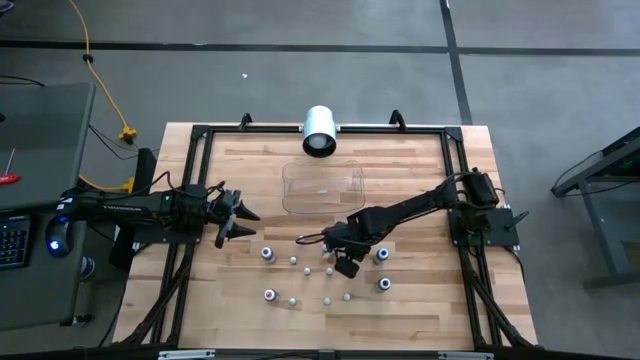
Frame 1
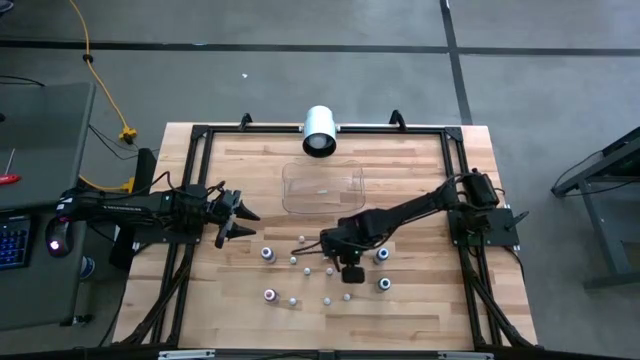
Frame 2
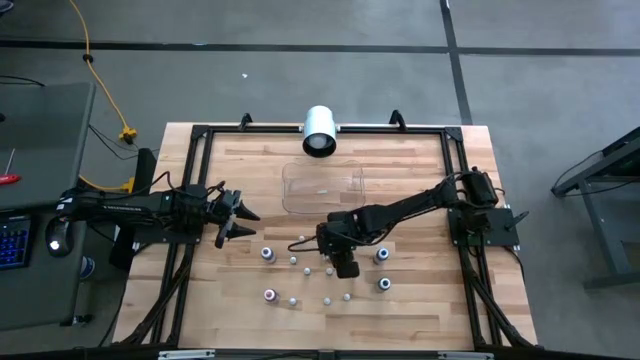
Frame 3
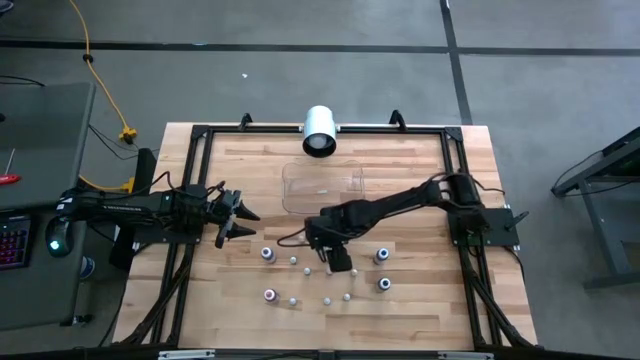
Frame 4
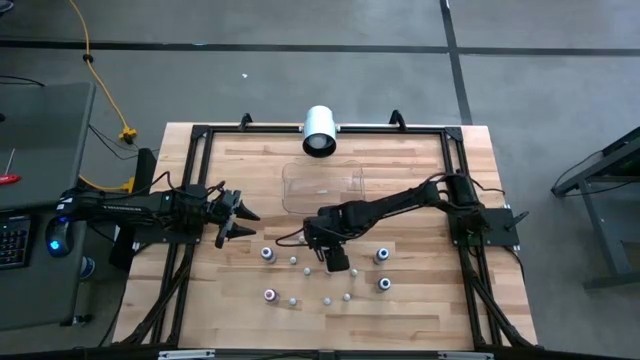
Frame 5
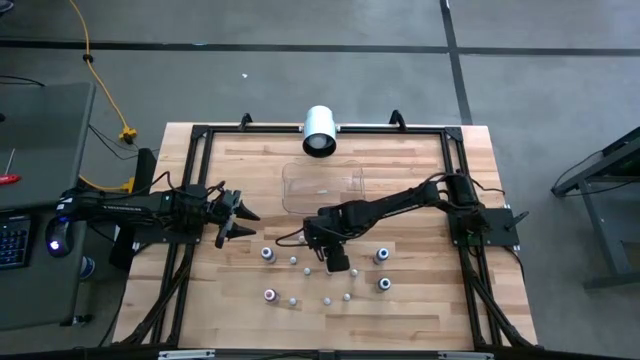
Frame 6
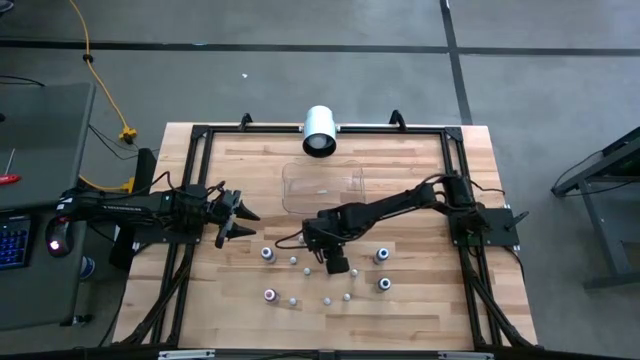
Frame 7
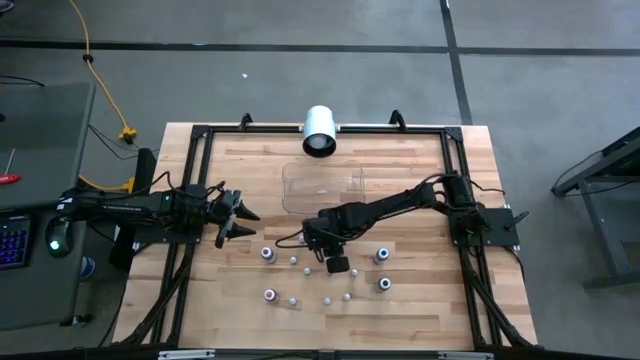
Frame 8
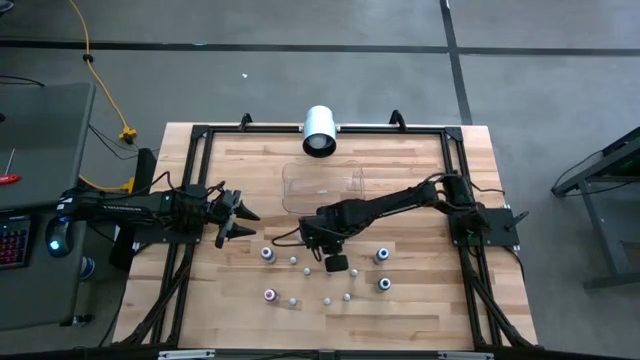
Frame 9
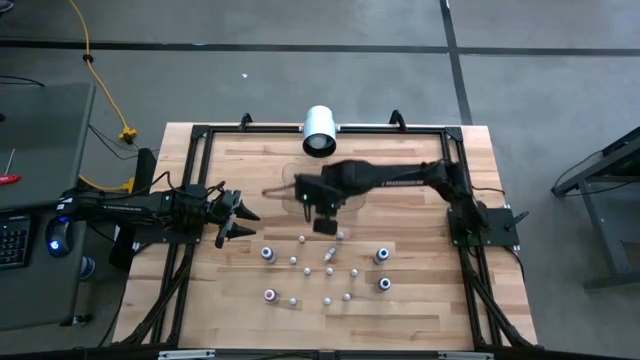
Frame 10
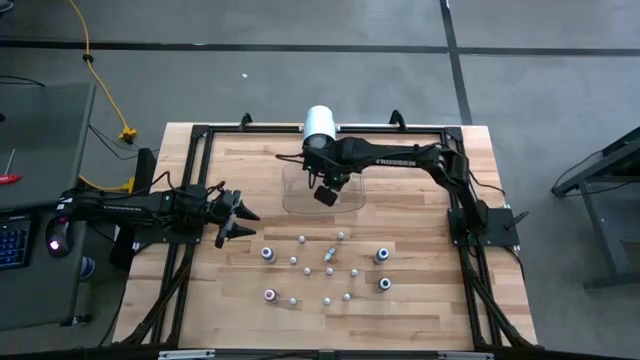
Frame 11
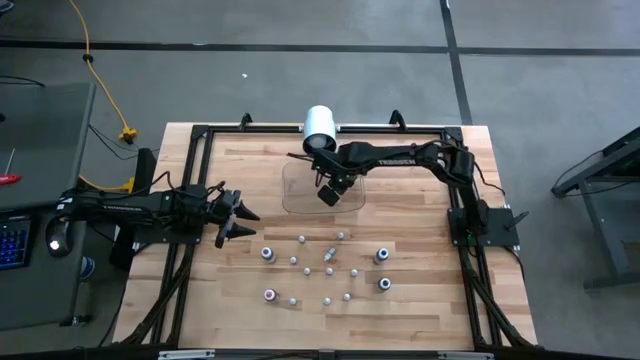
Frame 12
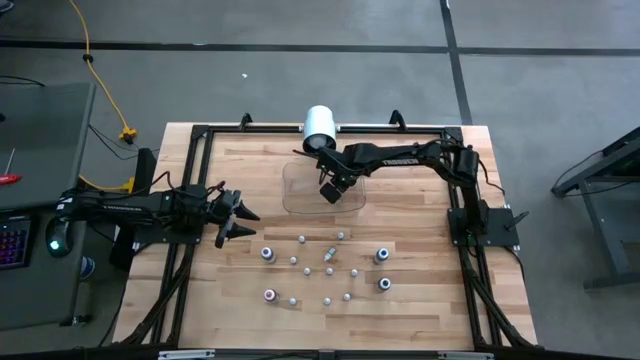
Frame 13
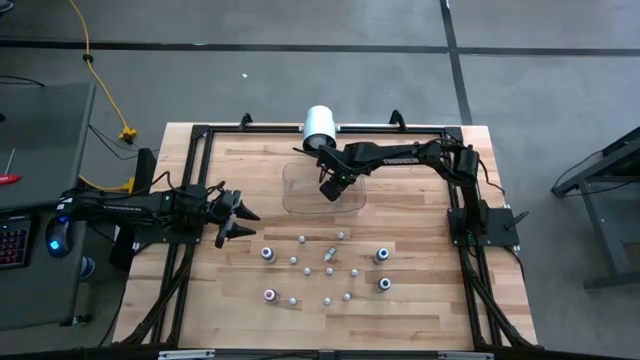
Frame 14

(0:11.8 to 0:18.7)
Task: Pick & Place food coloring
Put the small red food coloring bottle into the transparent bin

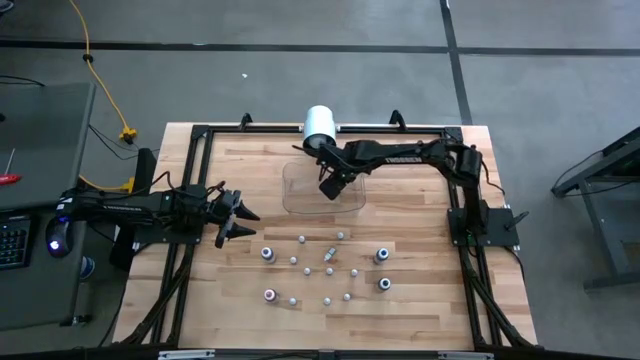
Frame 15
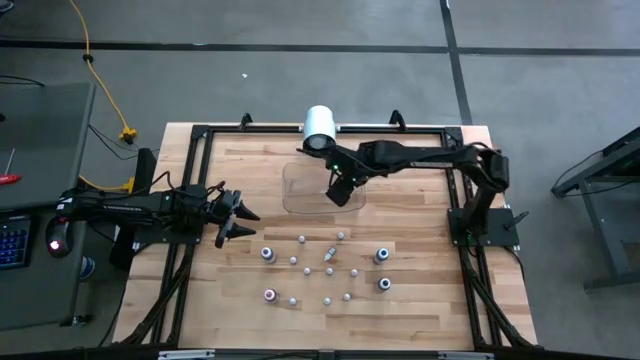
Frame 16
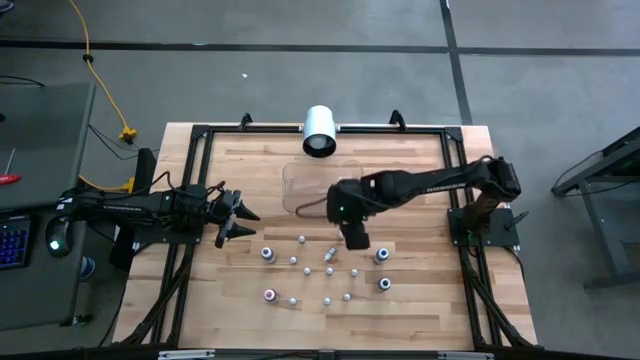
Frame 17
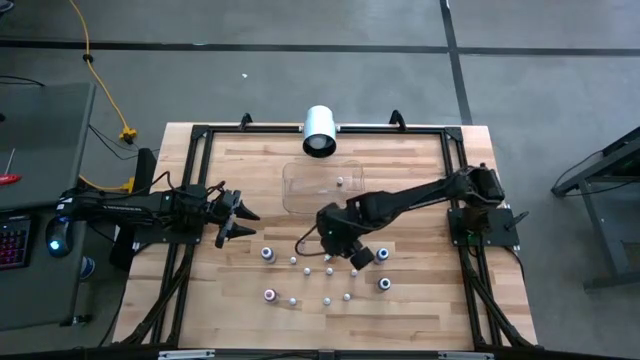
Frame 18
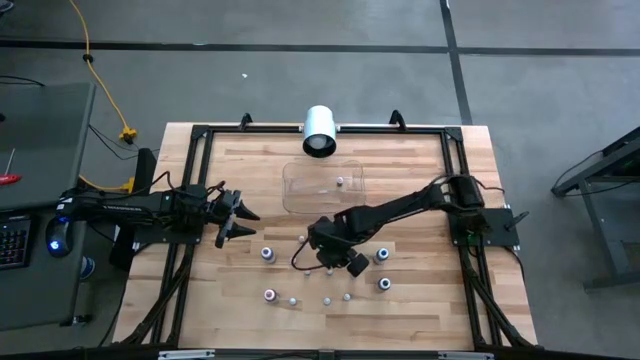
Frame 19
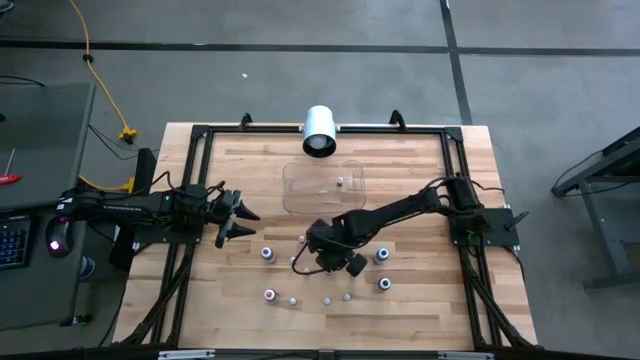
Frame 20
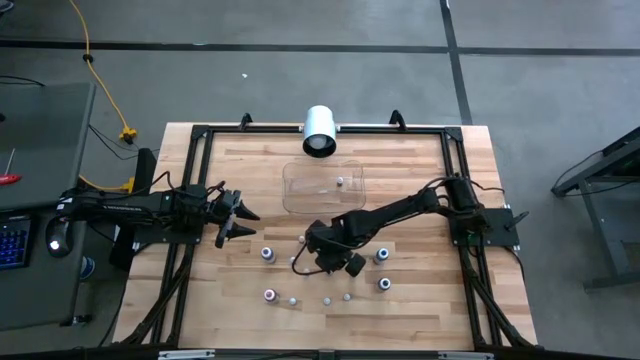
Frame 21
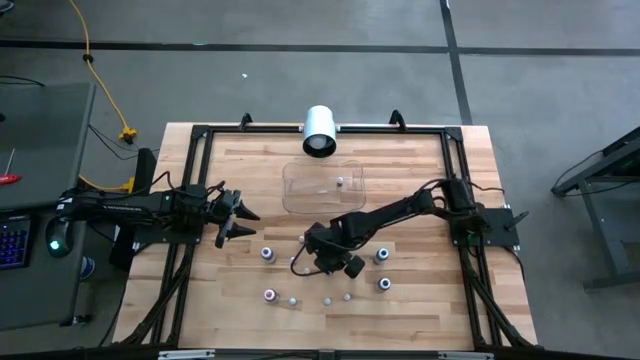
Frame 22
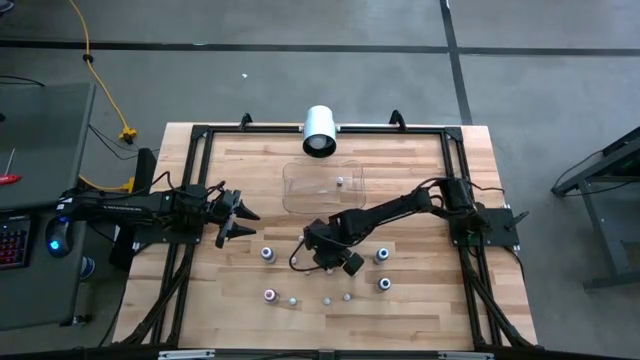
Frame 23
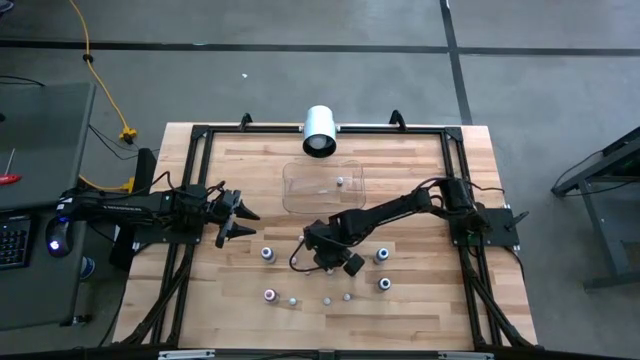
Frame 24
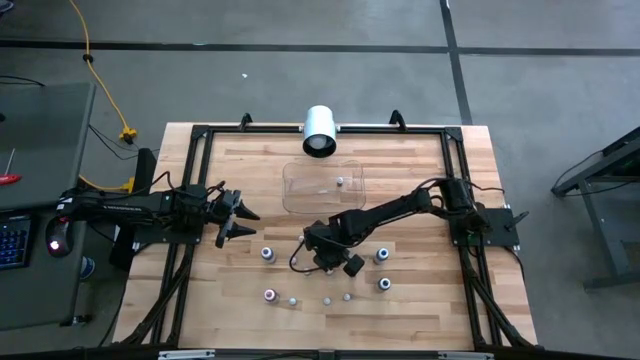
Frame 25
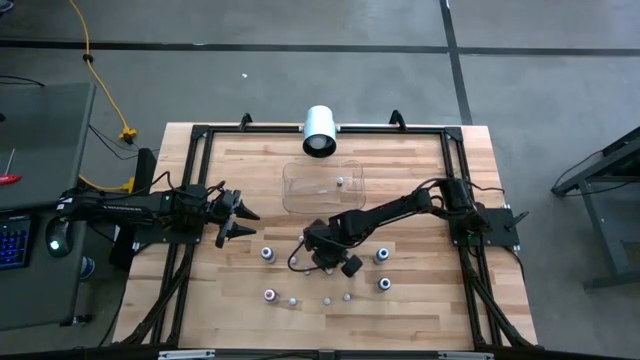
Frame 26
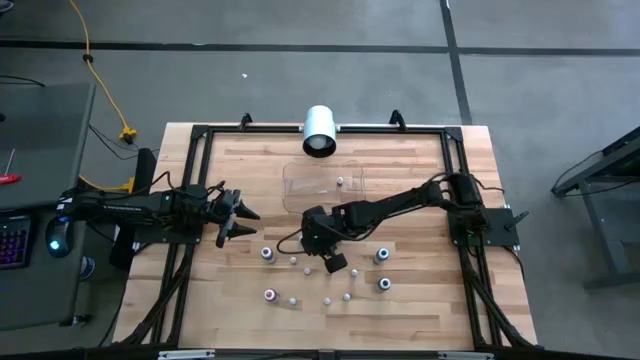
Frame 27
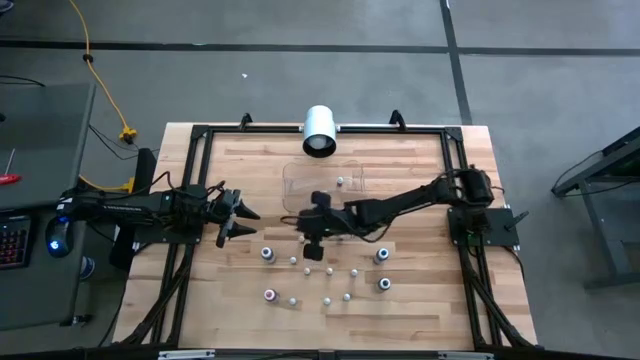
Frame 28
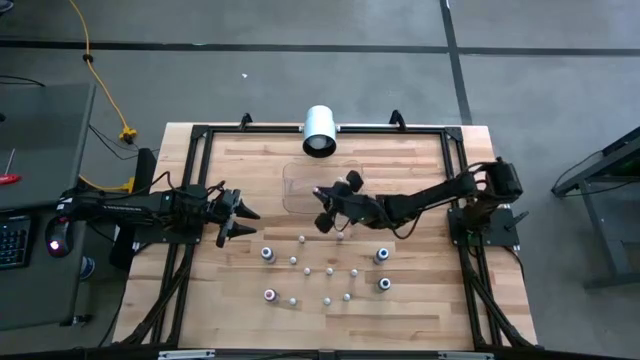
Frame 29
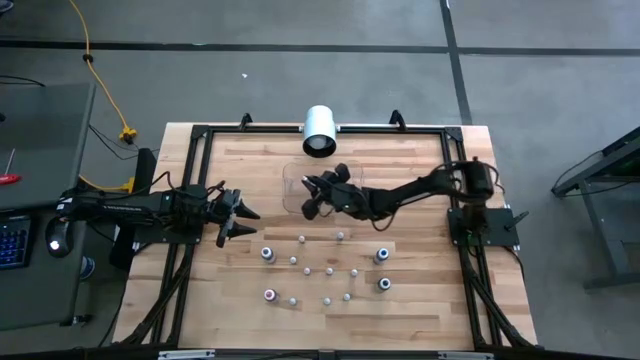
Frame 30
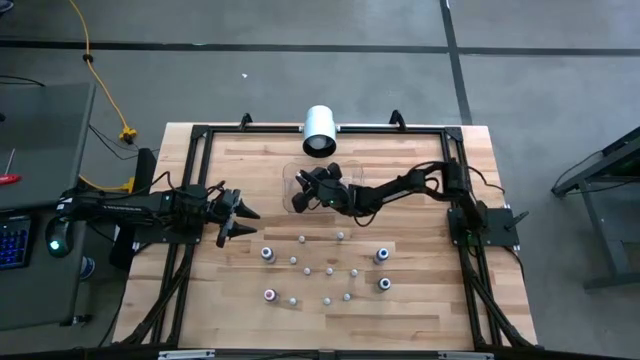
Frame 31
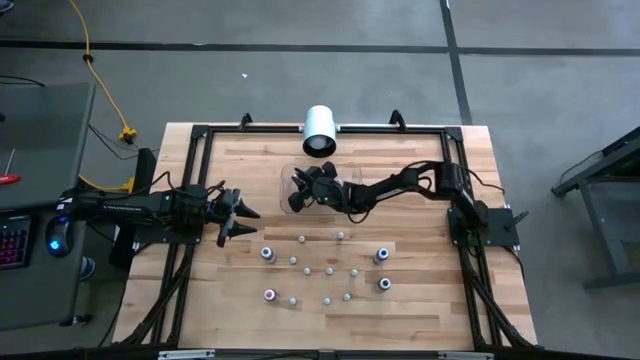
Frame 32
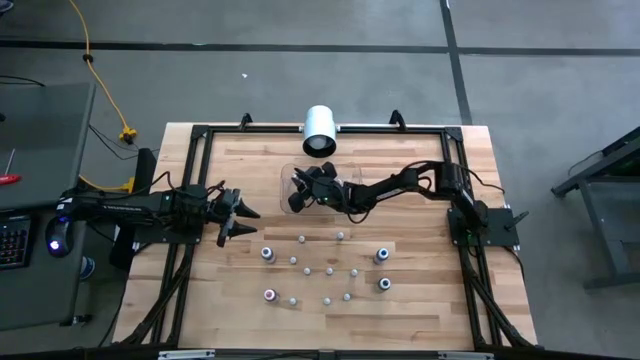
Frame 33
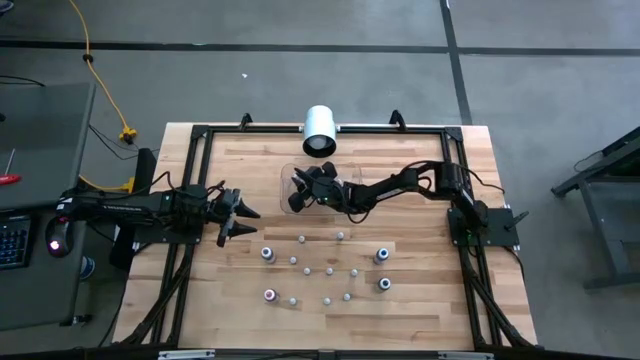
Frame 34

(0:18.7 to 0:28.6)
Put the small green food coloring bottle into the transparent bin

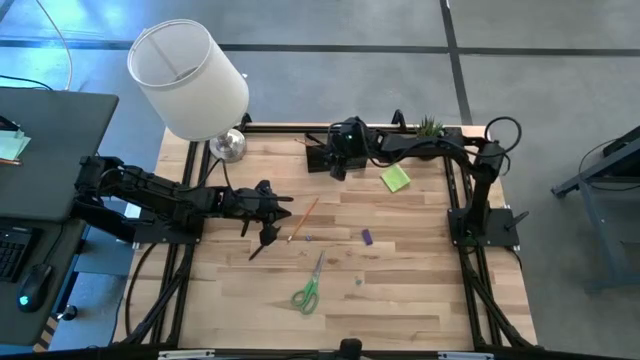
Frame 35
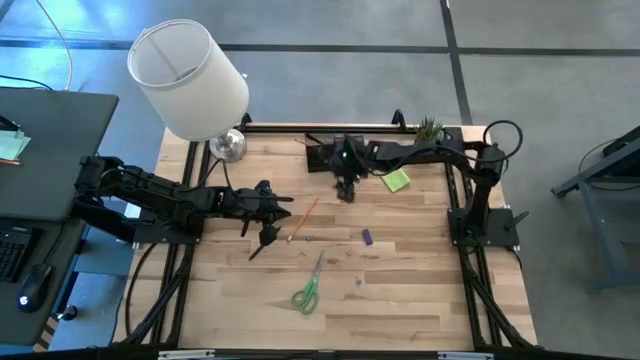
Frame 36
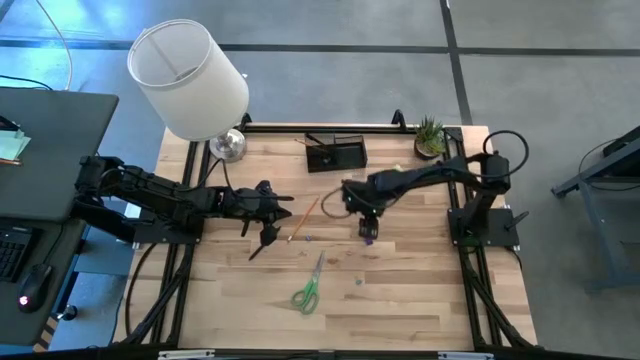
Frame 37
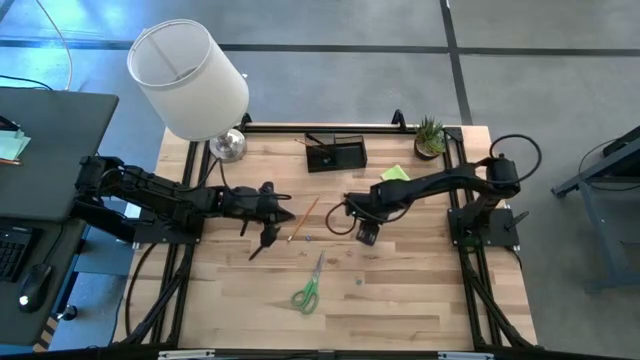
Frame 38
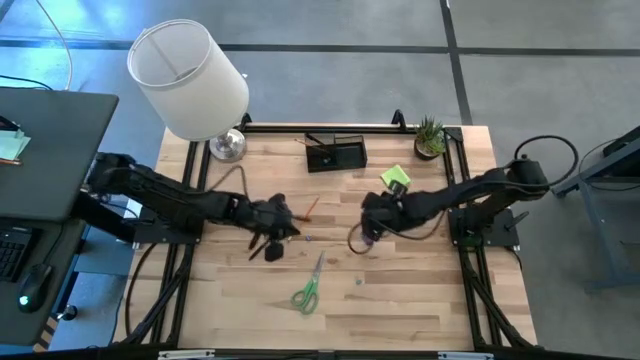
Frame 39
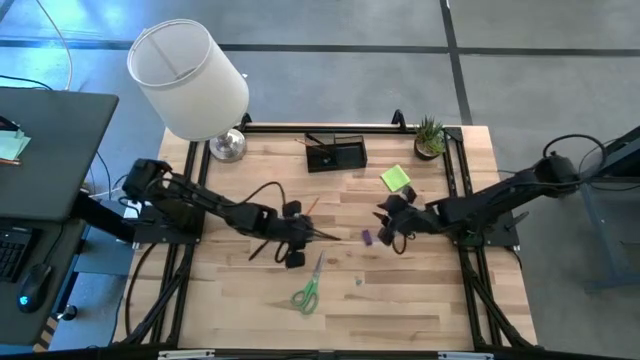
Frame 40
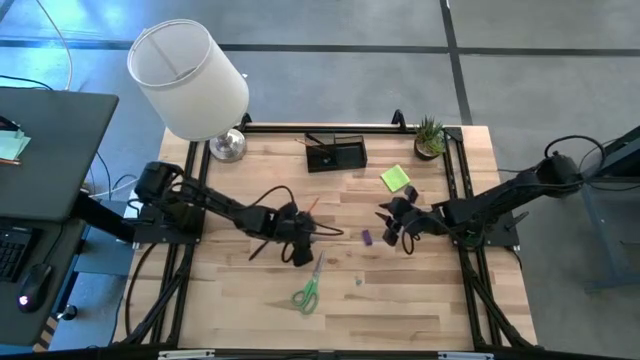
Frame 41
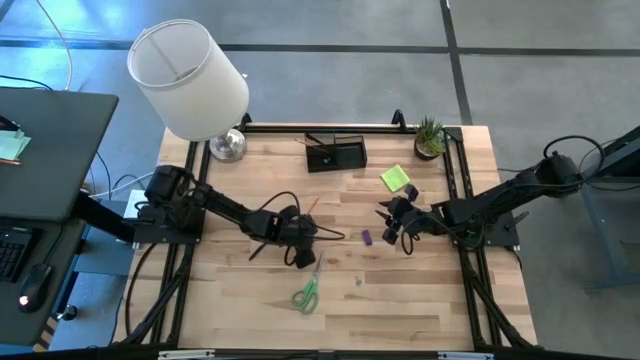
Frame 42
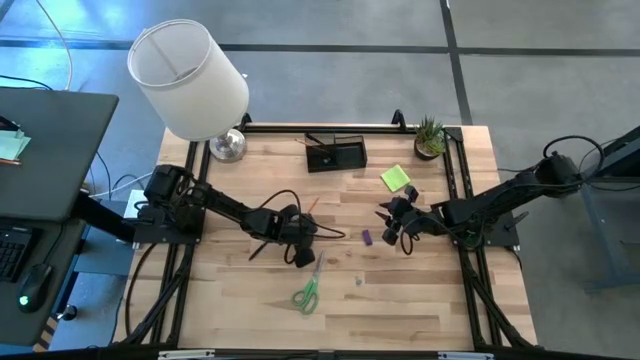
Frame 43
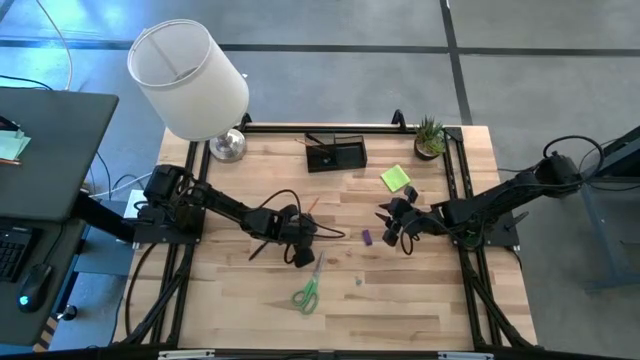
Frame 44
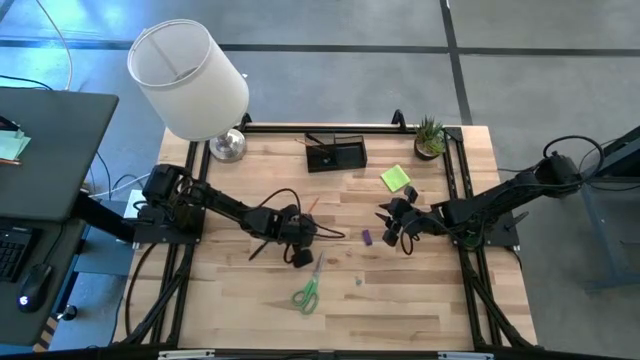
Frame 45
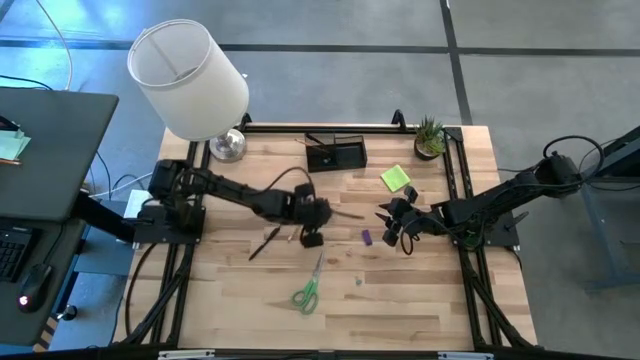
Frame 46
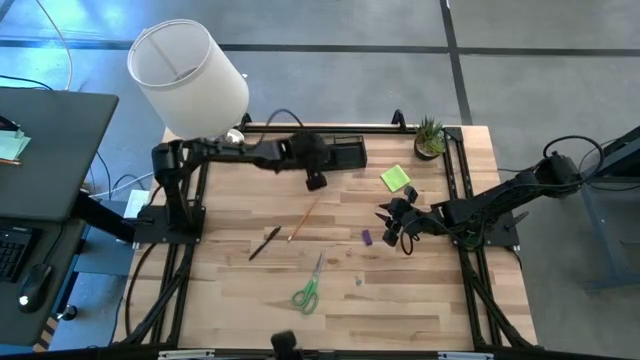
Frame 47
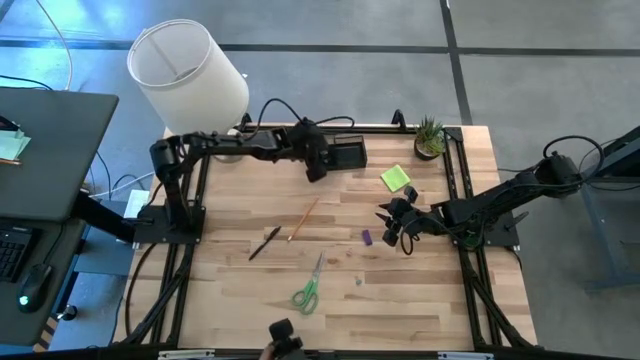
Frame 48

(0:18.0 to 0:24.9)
Task: Pick and place office supplies into organizer
Put the top blue binder clip into the black desk organizer
